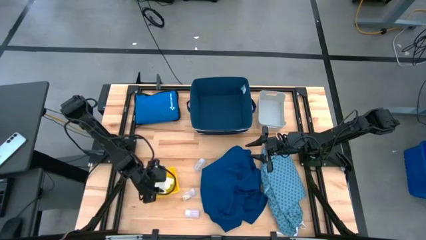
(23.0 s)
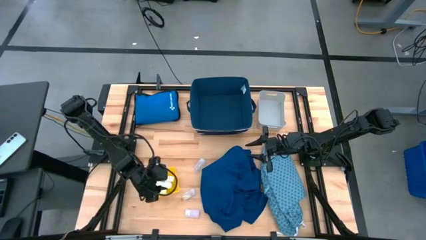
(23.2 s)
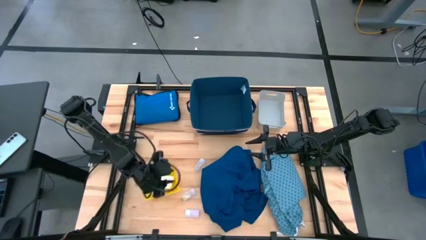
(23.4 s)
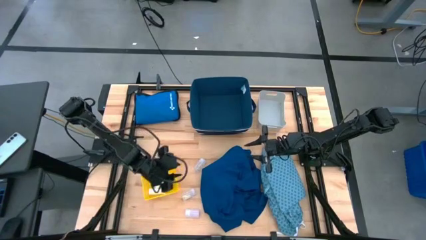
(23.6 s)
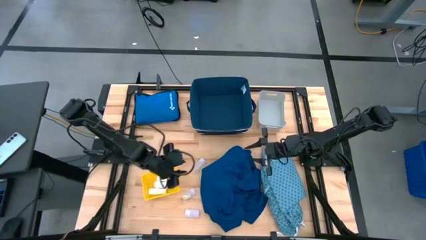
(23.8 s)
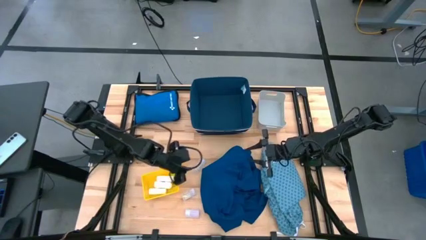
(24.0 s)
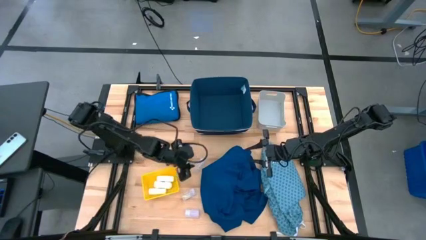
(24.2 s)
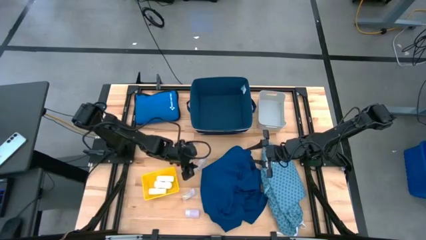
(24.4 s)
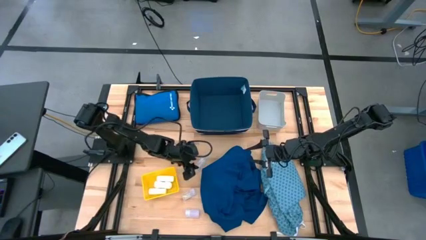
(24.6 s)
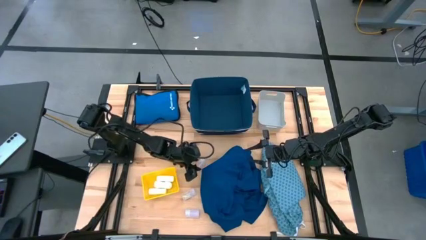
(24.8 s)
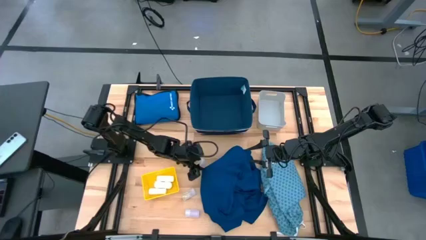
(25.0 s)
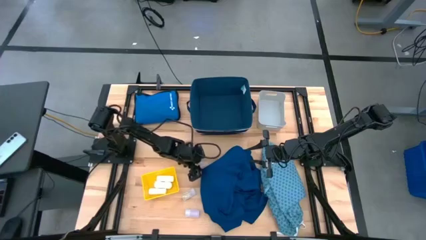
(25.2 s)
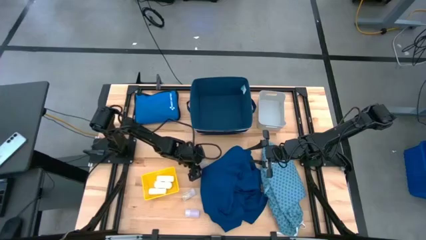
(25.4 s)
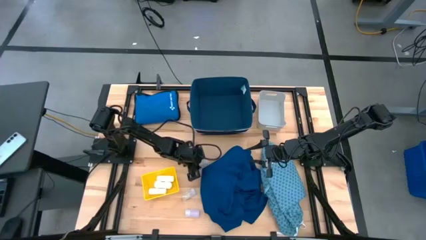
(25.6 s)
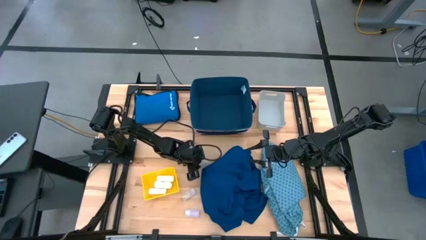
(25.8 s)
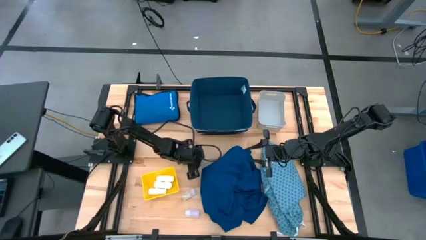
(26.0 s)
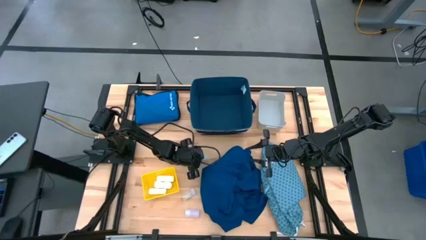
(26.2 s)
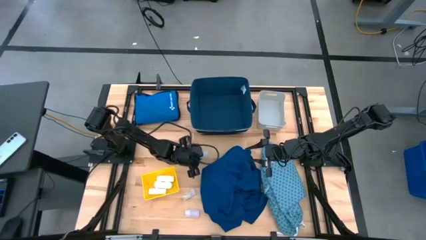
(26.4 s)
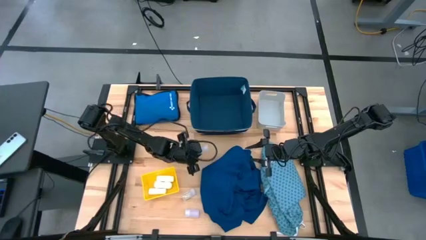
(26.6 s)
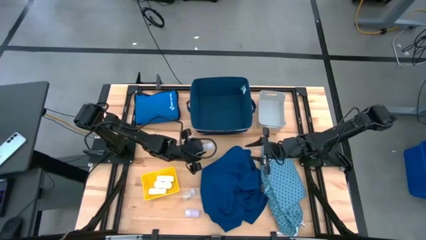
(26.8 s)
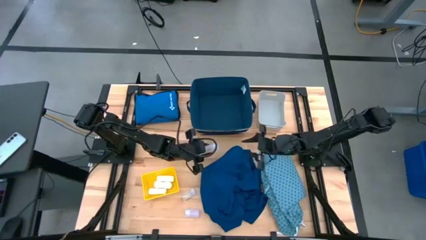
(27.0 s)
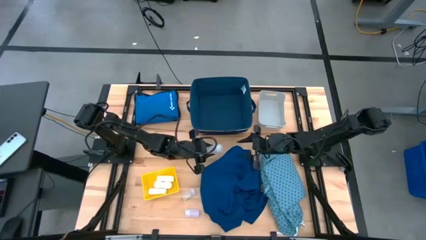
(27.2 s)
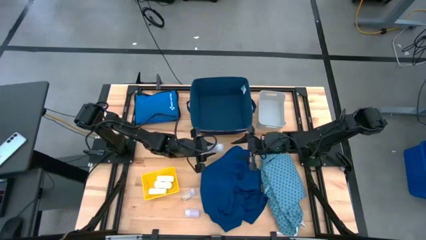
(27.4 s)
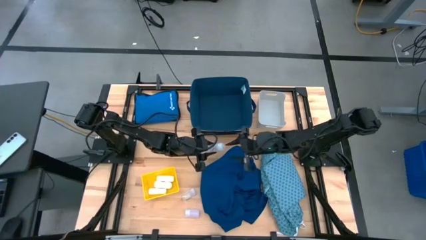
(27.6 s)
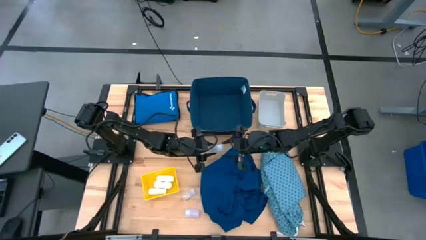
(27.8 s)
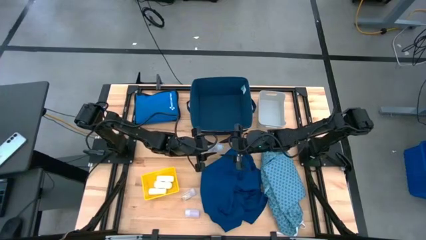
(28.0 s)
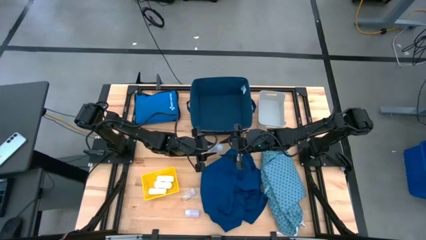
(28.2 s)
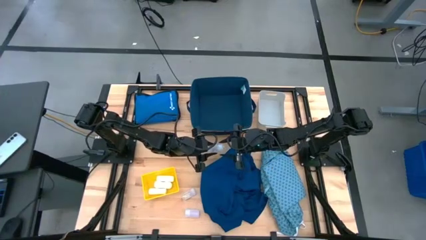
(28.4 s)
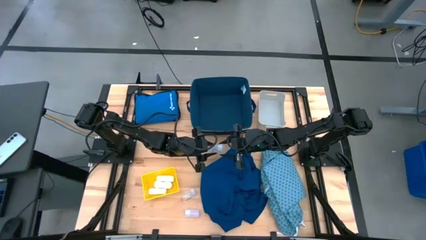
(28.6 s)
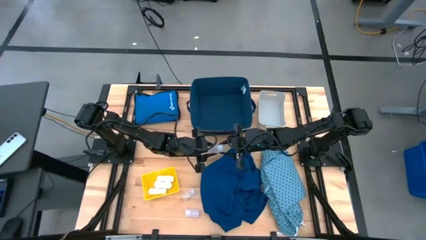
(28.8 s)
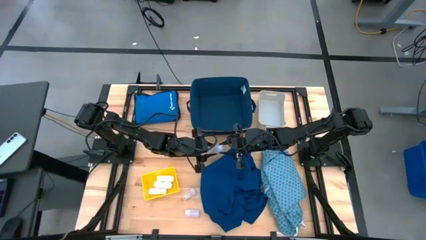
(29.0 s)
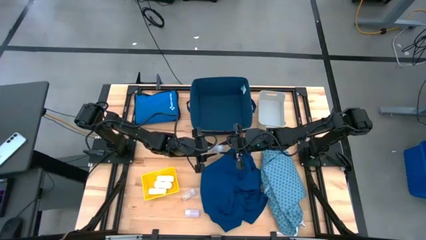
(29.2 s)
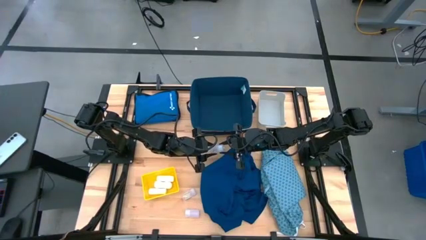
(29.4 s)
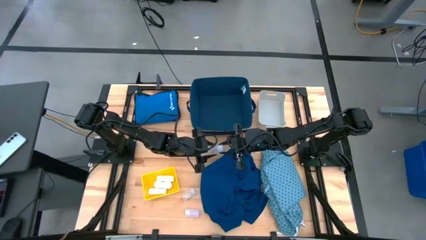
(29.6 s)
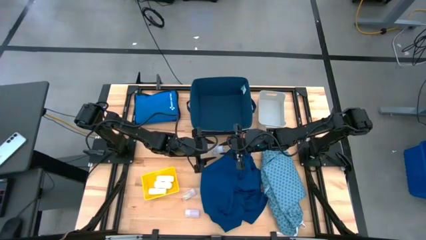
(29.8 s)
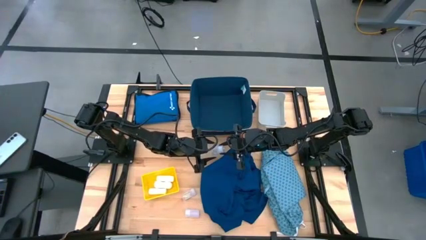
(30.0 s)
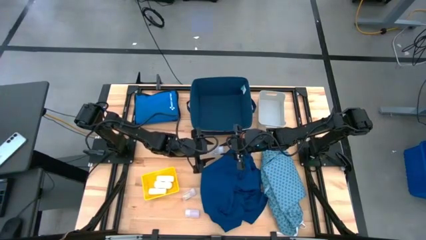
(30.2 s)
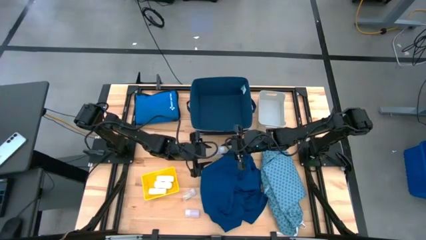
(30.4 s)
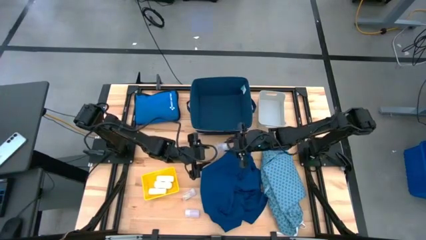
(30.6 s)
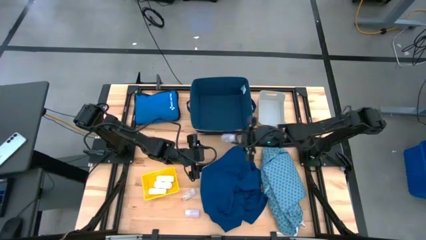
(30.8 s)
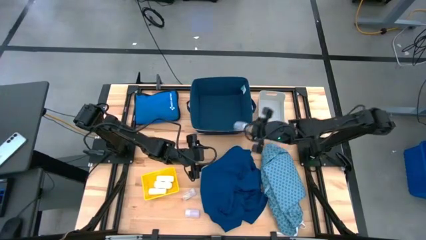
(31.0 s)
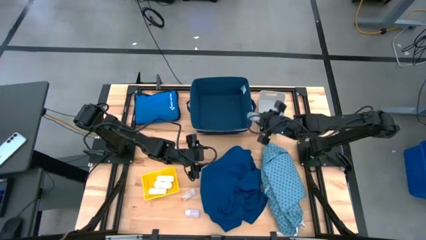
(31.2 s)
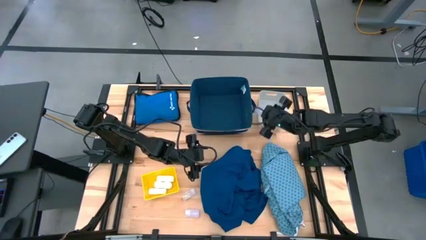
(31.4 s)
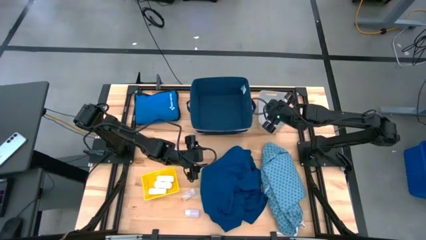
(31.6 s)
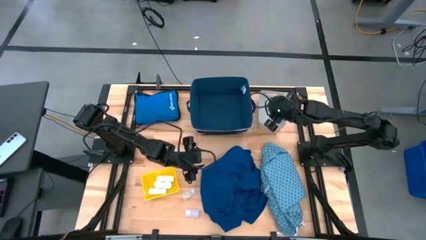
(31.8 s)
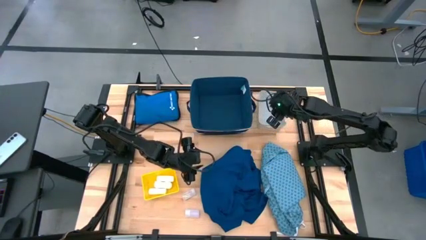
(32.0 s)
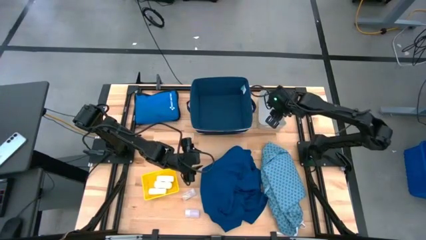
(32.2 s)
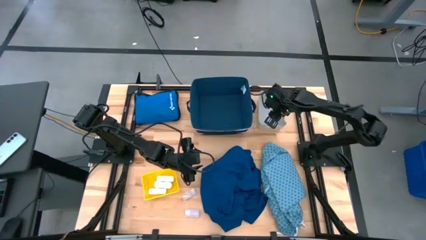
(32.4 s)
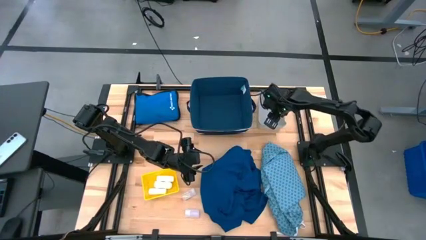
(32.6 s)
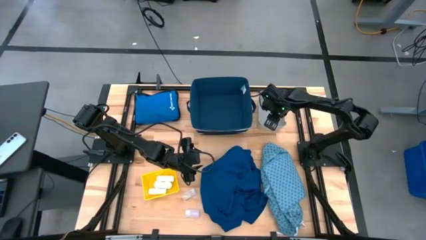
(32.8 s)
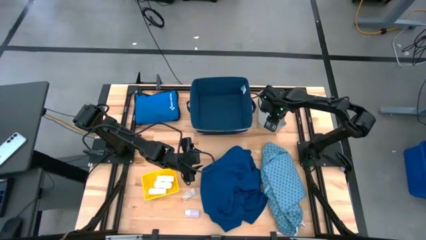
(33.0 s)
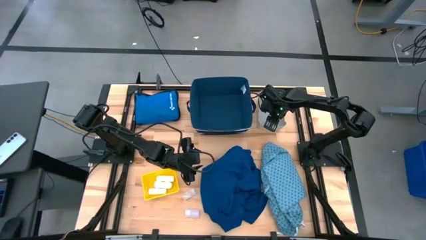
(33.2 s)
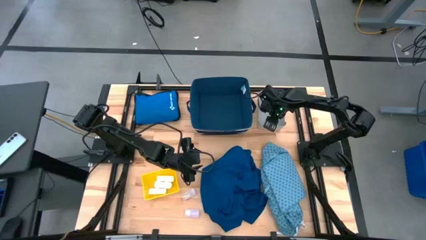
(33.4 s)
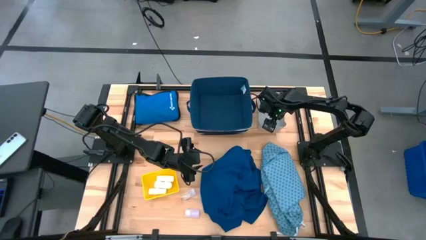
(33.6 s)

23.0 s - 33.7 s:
Task: Pick & Place Medicine items
Put the top right transparent pill bottle into the white bin

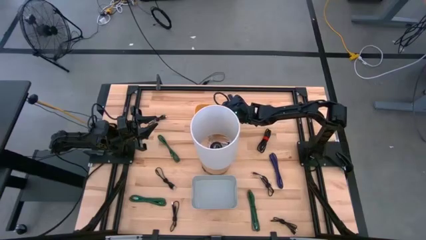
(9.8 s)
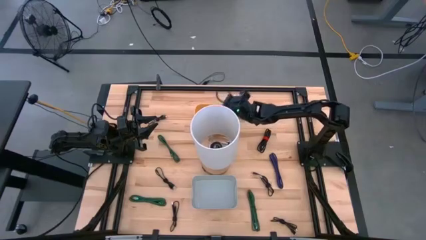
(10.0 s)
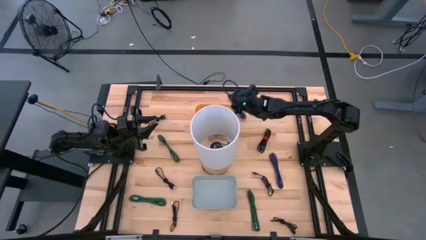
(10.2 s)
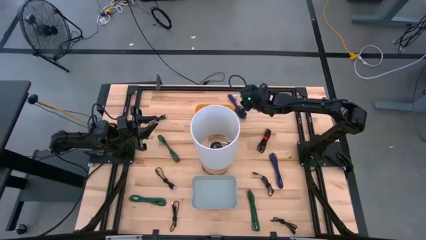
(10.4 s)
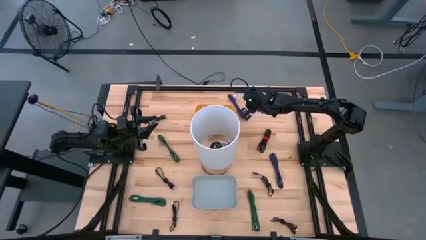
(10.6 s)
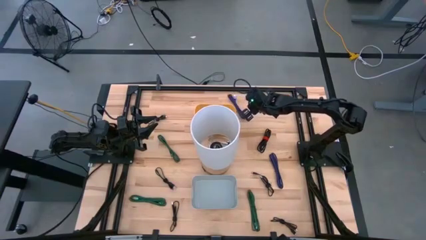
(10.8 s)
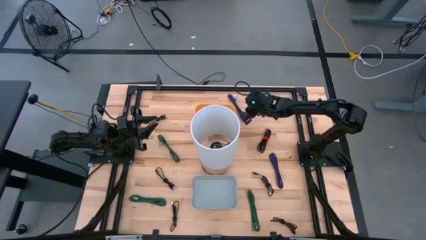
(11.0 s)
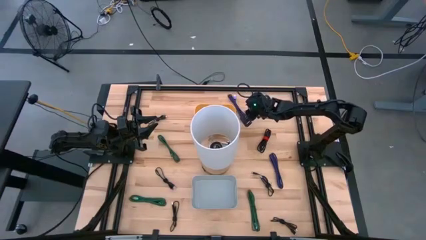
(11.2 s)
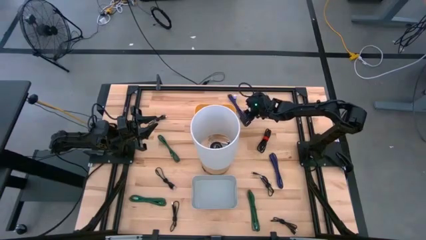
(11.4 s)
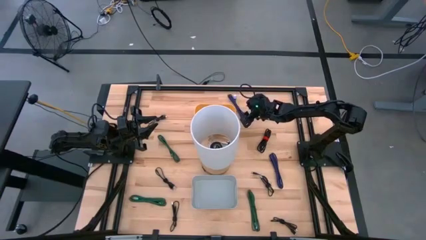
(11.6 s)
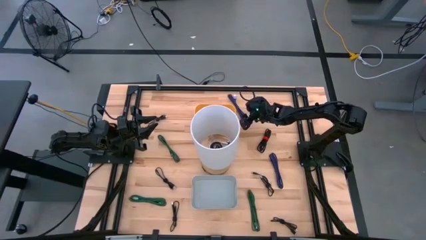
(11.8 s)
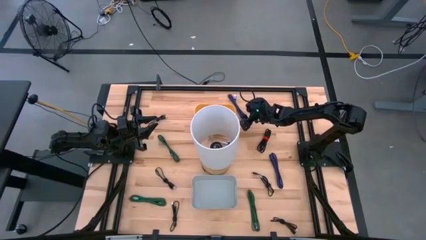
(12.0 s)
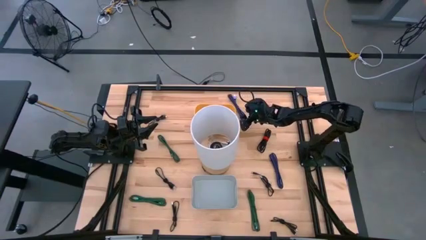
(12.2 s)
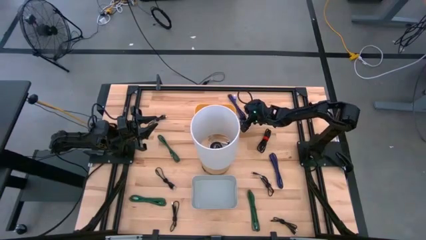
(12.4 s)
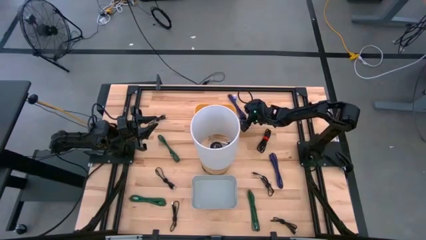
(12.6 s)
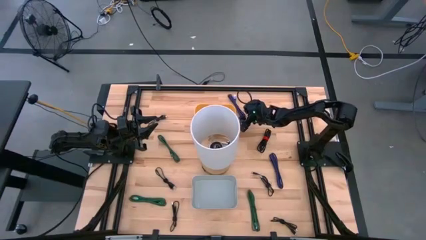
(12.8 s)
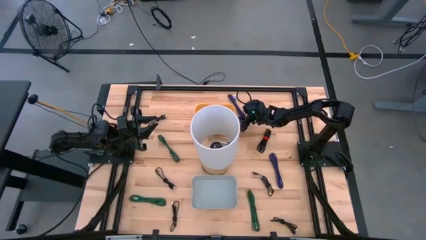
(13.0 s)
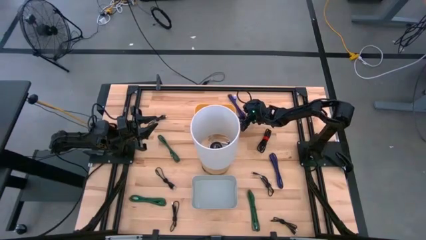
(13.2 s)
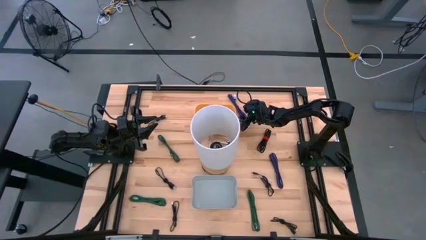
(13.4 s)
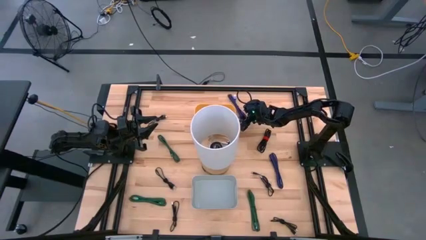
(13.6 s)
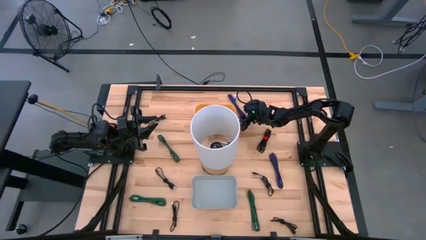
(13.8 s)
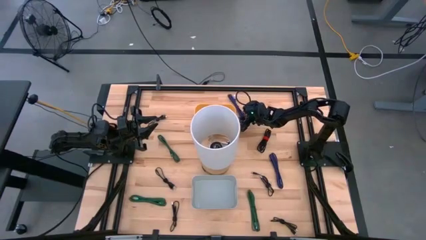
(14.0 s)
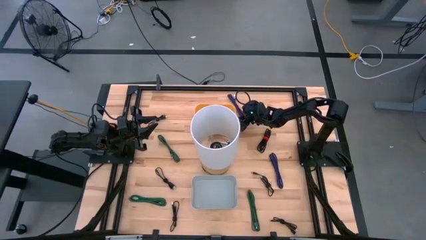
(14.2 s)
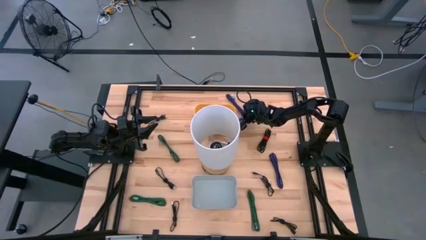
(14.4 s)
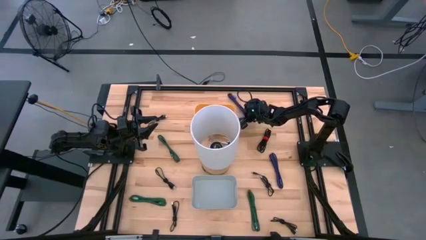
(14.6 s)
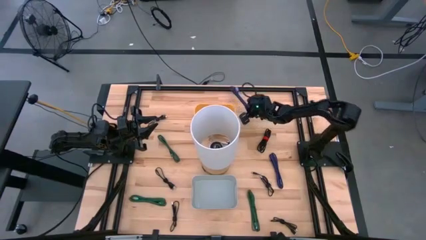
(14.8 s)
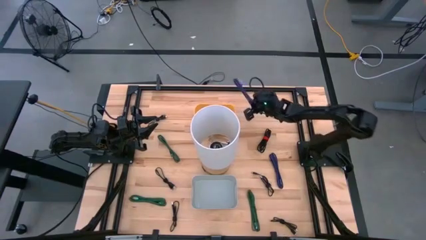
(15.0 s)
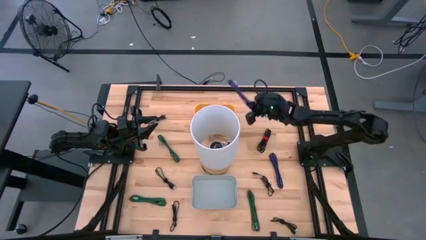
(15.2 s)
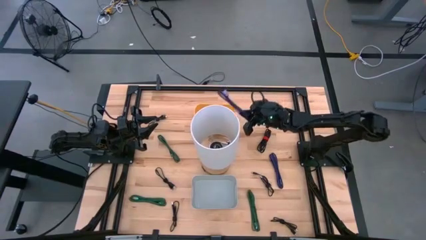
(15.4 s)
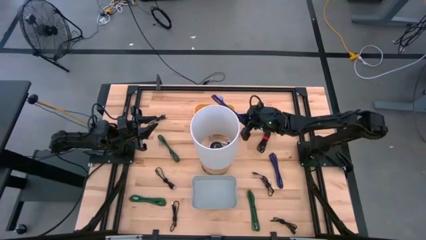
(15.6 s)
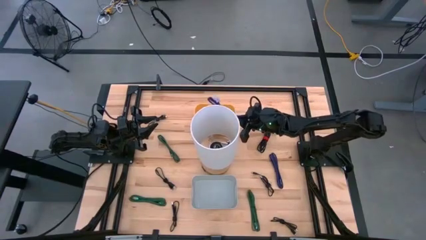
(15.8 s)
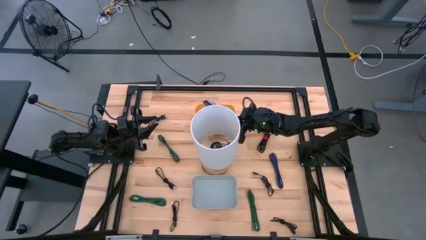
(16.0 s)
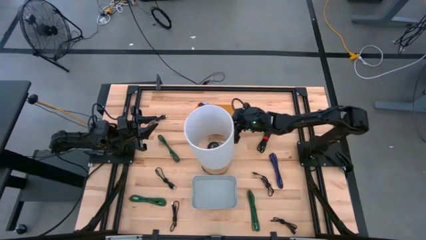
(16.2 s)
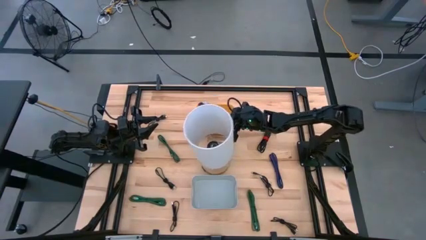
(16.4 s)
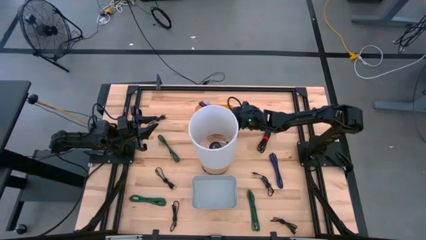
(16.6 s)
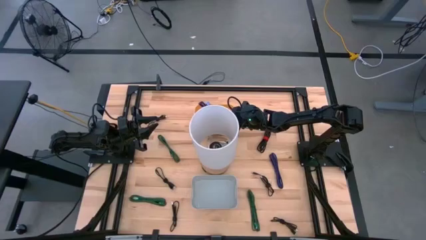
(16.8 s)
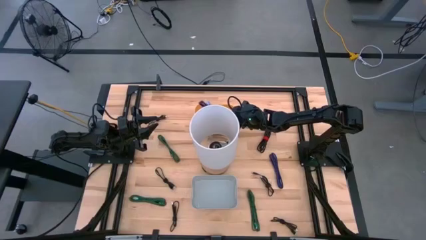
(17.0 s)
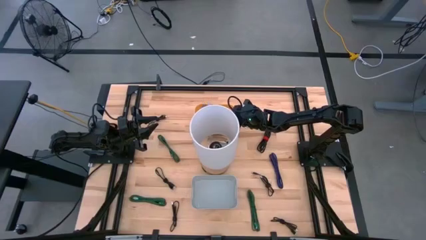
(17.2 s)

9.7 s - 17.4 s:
Task: Pick & Place USB Port
Put the purple charger cable into the yellow bin
